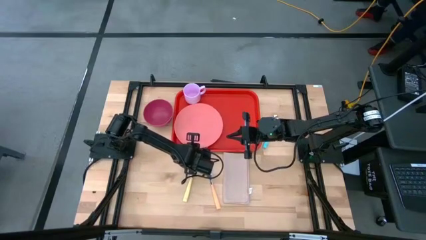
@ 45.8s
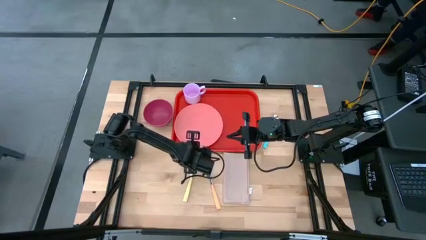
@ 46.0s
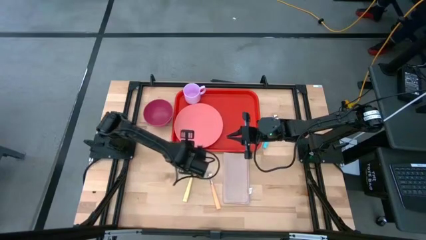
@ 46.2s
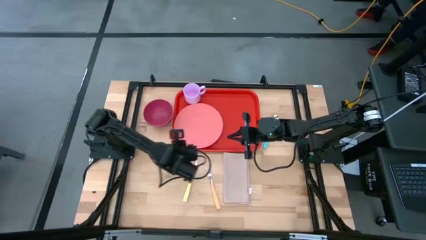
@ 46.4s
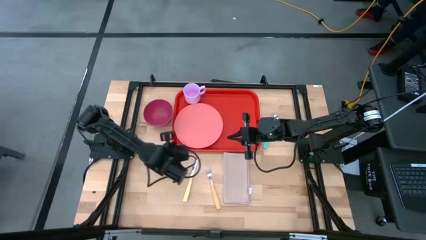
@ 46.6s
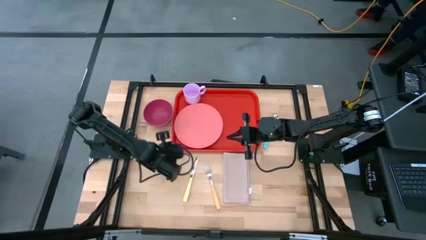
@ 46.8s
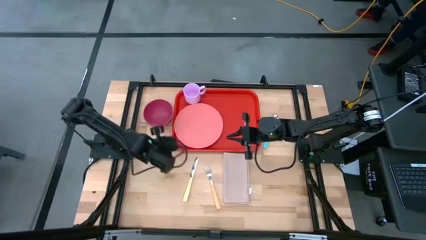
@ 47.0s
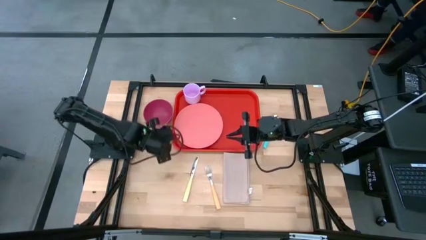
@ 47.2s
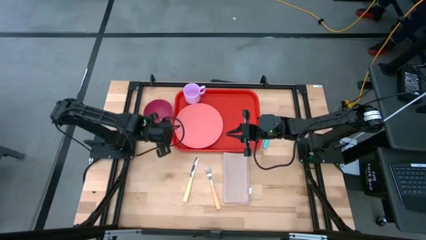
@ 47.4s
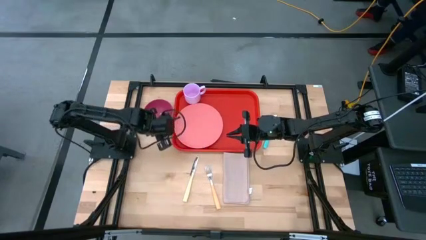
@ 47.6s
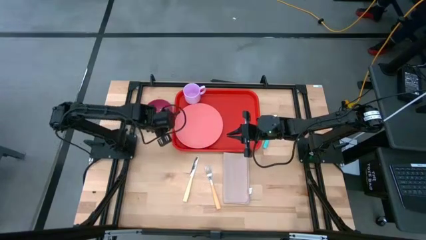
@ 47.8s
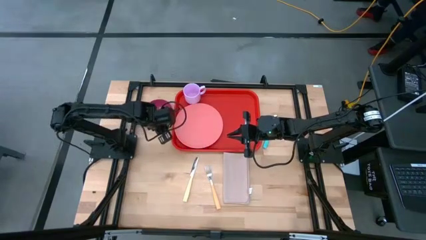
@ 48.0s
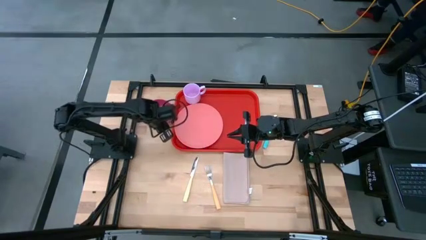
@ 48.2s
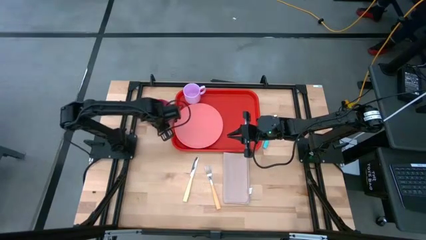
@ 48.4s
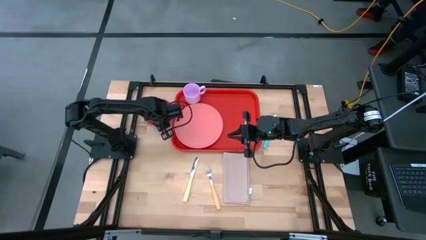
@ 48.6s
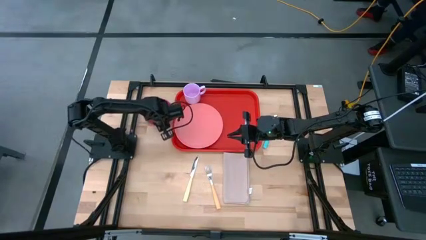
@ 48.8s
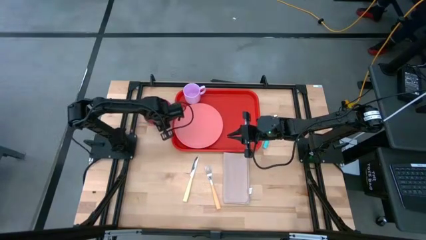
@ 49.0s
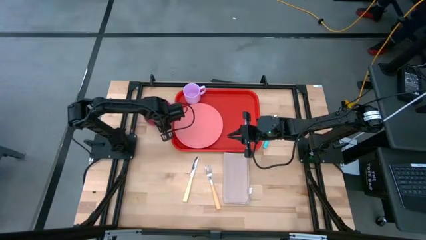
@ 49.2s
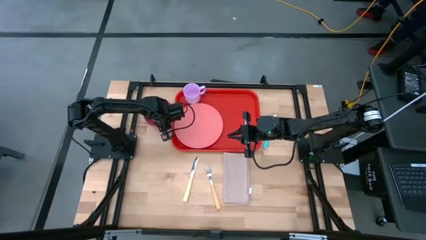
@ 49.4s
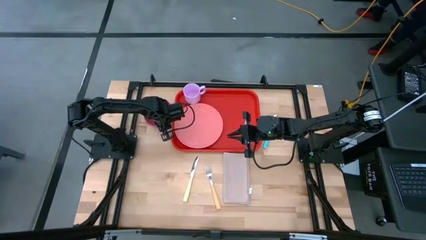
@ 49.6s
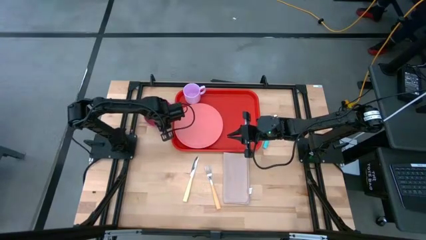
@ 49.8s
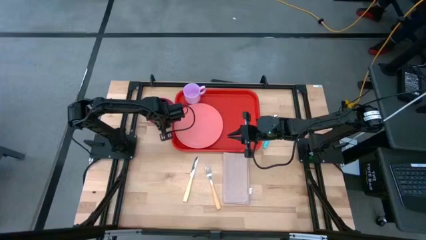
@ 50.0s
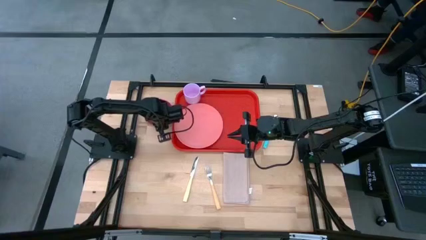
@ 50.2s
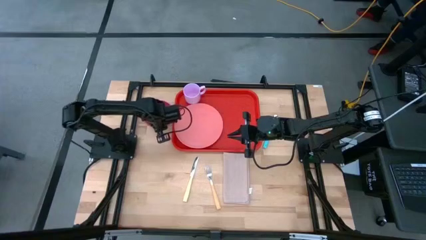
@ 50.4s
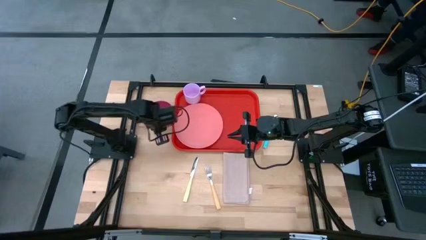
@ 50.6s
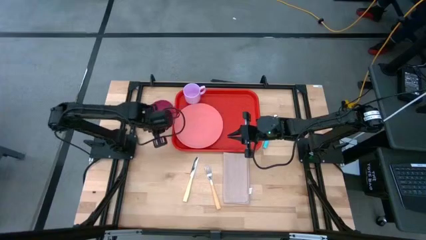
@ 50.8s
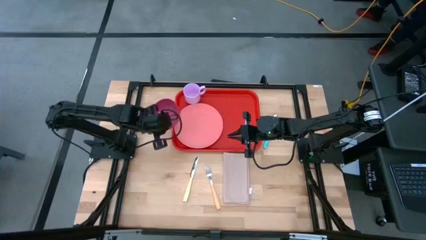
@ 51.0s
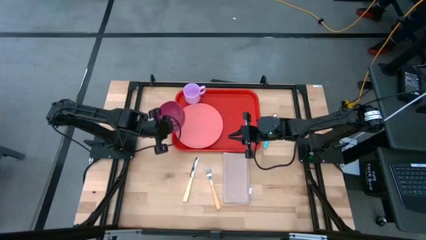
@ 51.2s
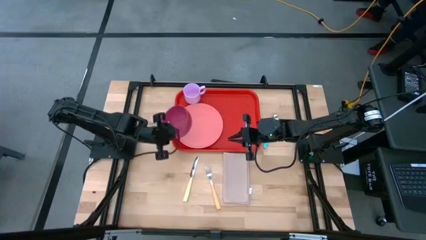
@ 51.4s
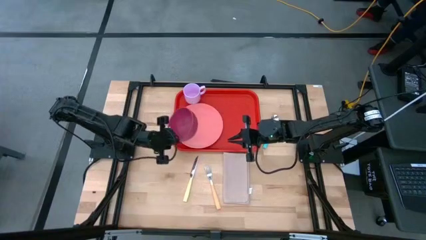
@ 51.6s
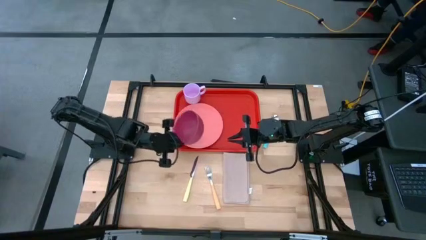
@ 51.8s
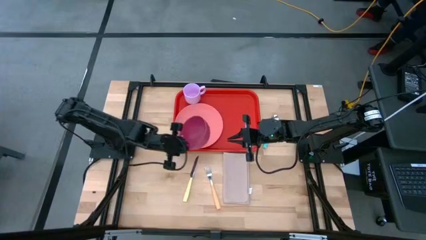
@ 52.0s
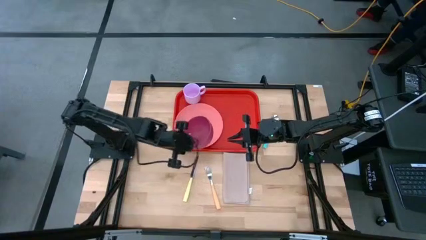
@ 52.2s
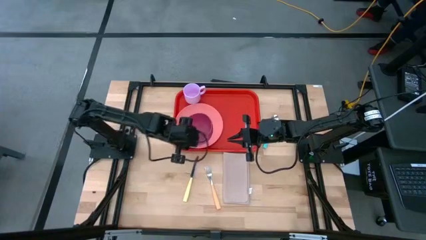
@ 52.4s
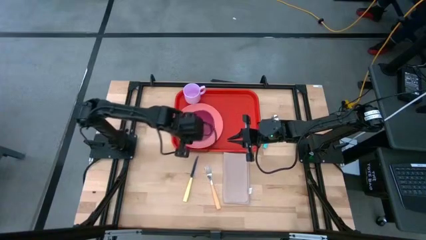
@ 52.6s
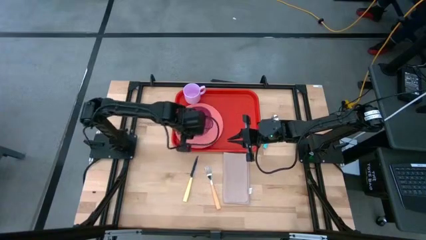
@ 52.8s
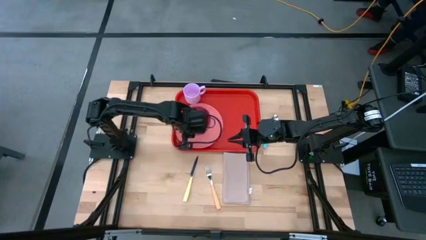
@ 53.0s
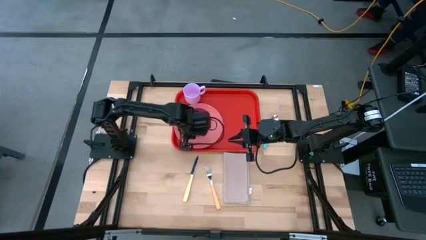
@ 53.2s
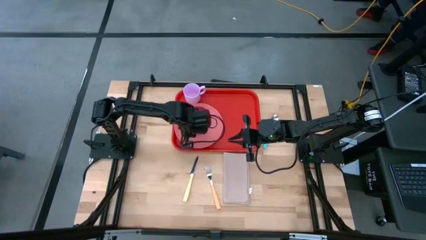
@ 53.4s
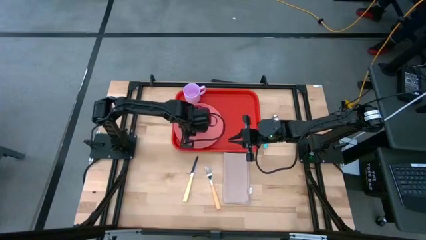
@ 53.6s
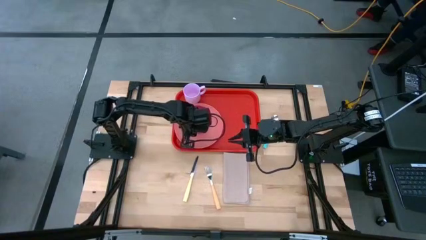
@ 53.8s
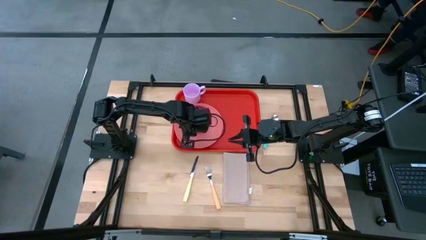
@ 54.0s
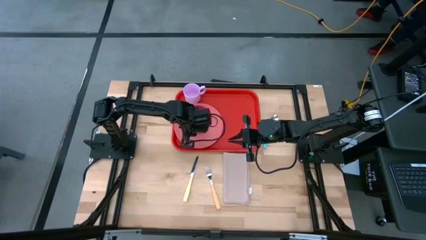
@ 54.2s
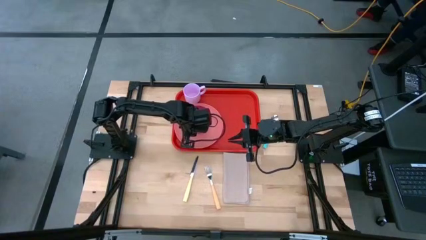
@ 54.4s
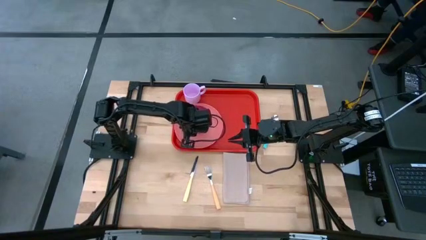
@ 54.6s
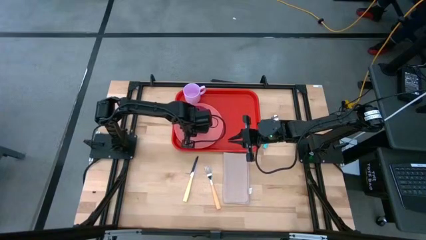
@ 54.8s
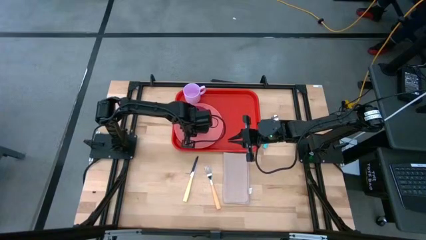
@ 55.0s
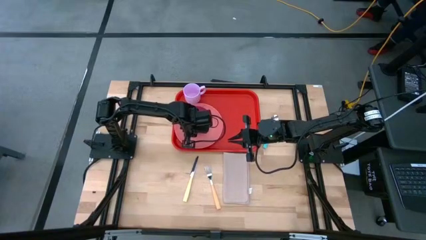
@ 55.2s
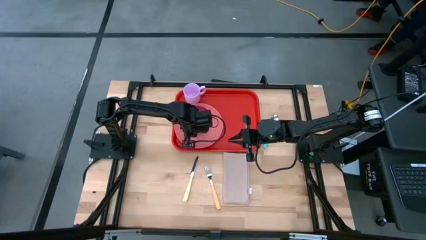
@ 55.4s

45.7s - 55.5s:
Task: Set up tray
Put the red bowl on top of the pink plate

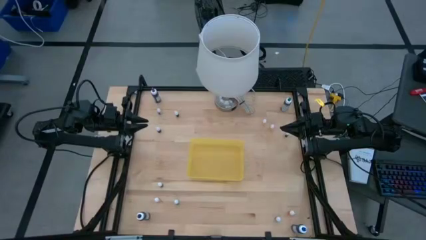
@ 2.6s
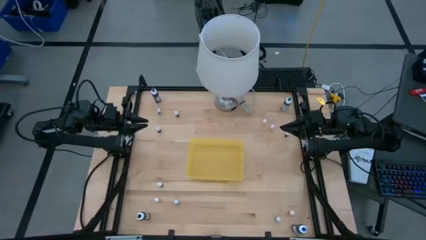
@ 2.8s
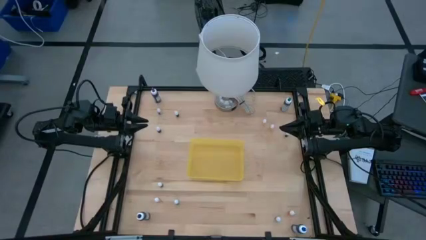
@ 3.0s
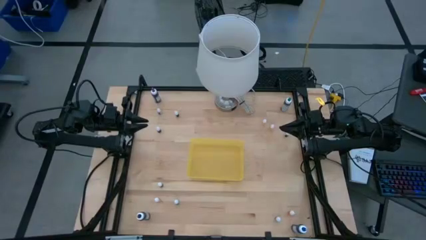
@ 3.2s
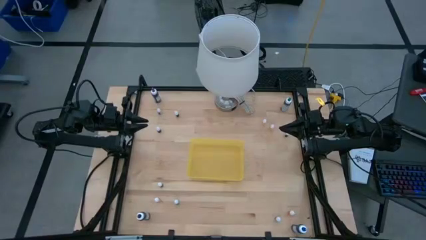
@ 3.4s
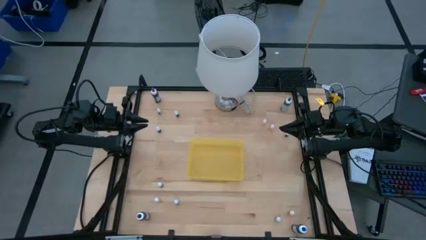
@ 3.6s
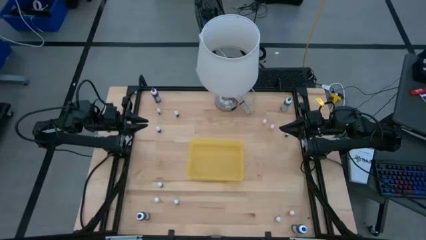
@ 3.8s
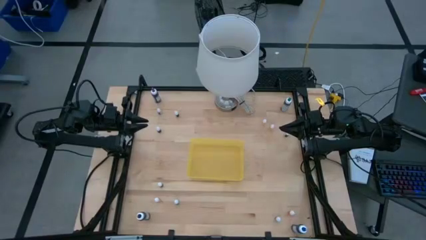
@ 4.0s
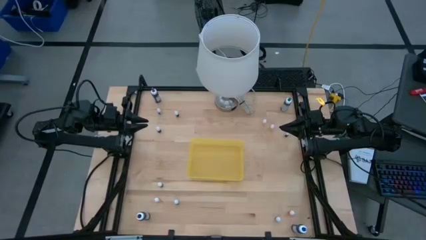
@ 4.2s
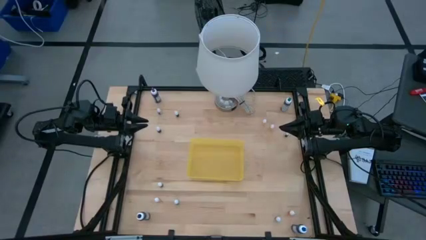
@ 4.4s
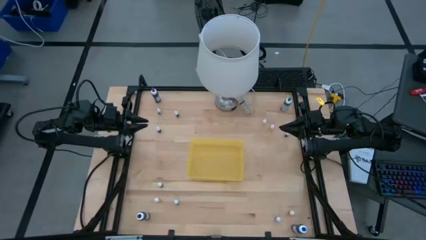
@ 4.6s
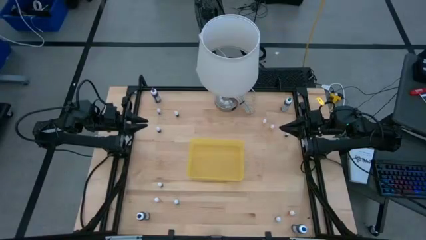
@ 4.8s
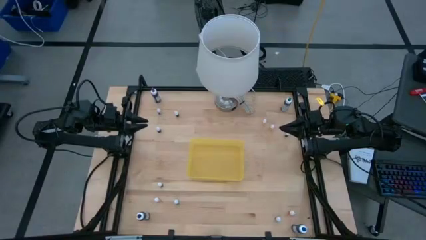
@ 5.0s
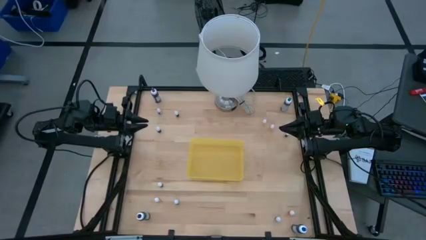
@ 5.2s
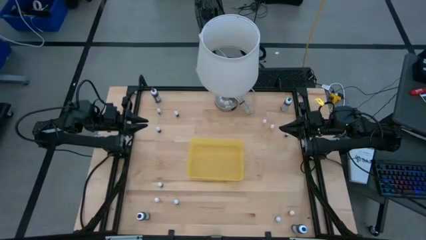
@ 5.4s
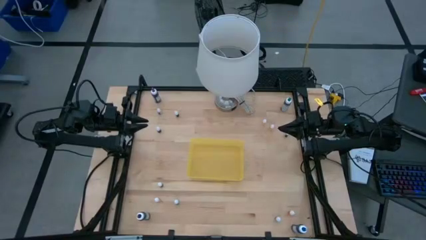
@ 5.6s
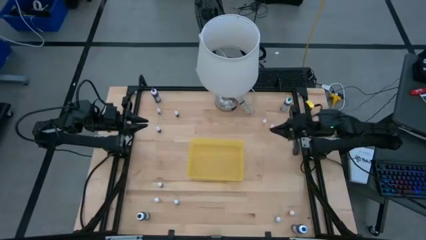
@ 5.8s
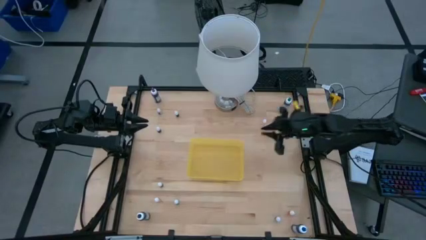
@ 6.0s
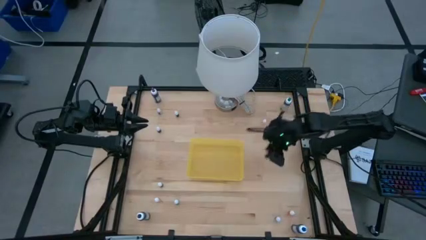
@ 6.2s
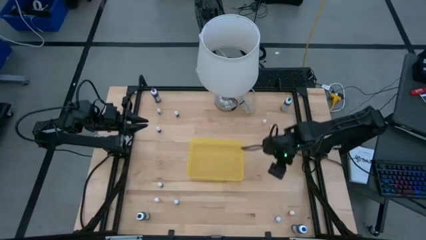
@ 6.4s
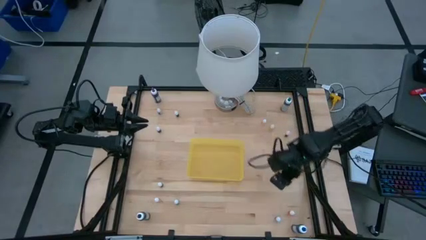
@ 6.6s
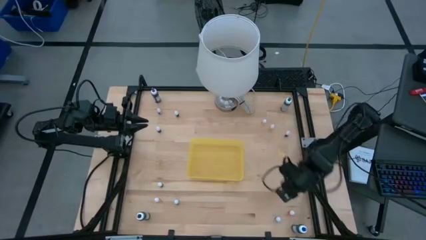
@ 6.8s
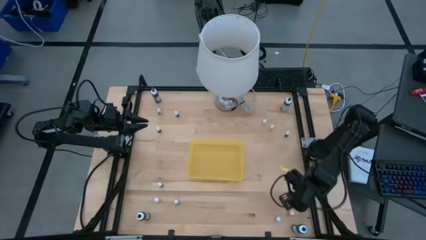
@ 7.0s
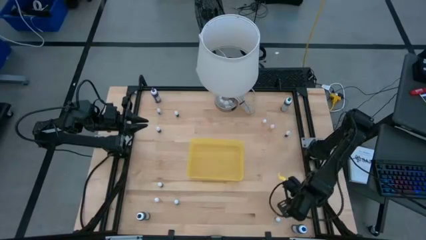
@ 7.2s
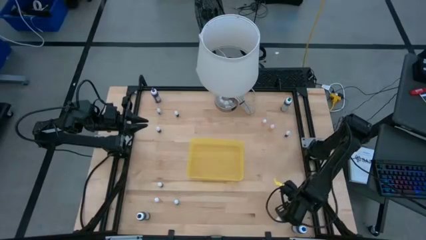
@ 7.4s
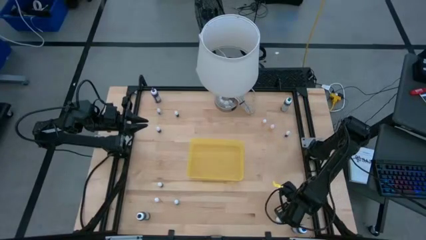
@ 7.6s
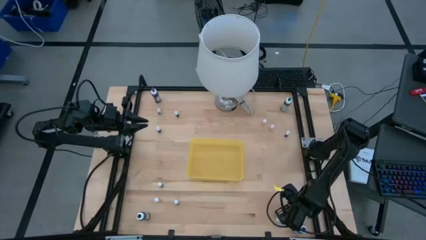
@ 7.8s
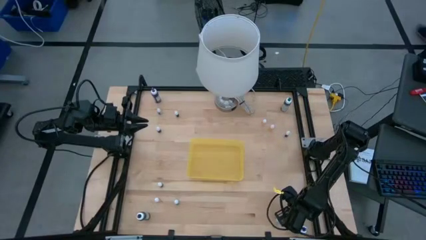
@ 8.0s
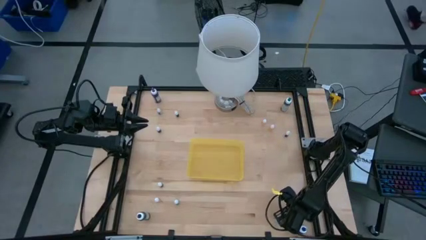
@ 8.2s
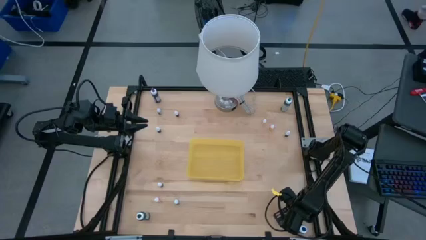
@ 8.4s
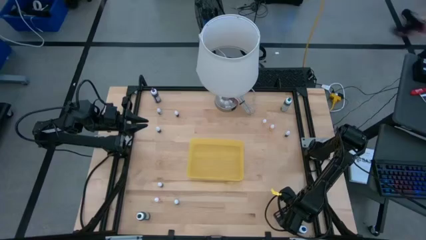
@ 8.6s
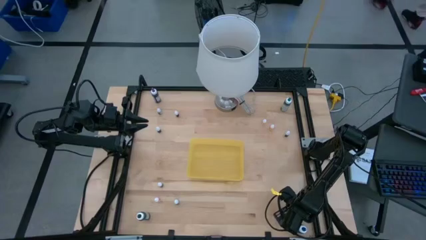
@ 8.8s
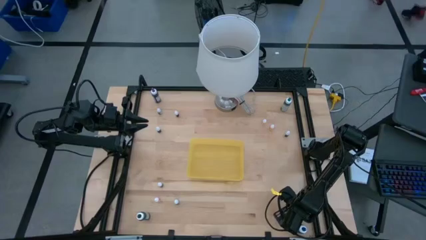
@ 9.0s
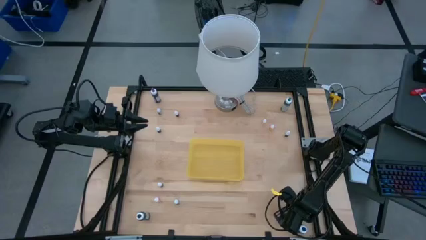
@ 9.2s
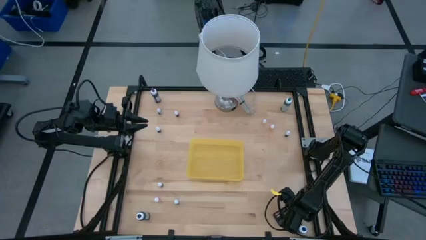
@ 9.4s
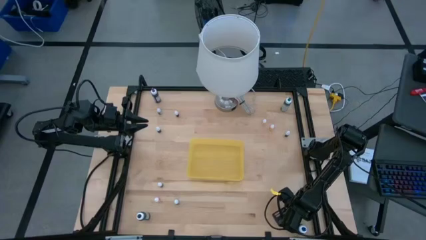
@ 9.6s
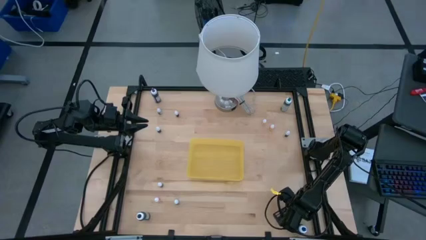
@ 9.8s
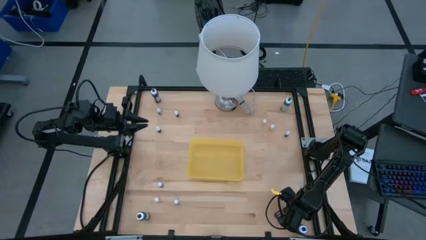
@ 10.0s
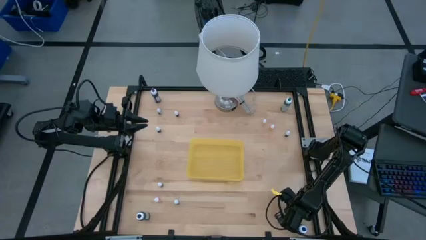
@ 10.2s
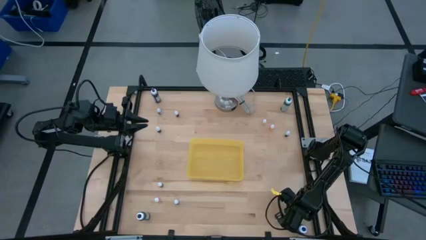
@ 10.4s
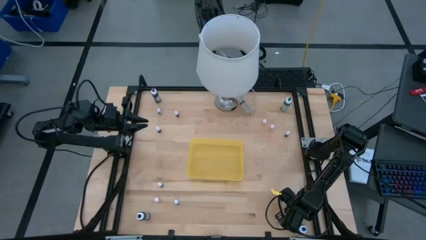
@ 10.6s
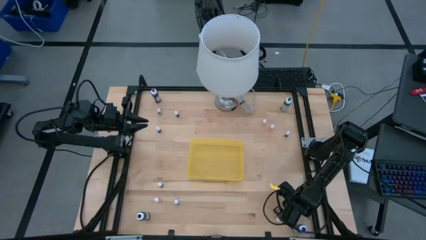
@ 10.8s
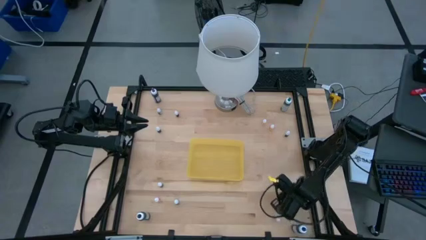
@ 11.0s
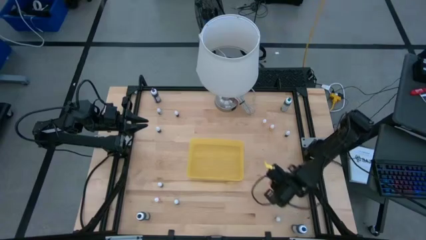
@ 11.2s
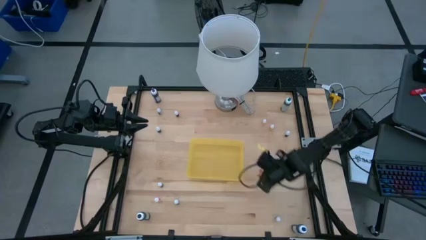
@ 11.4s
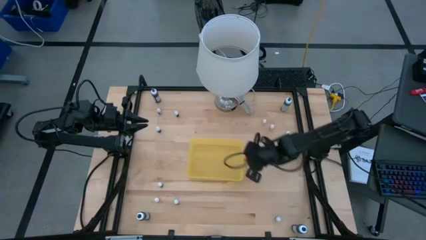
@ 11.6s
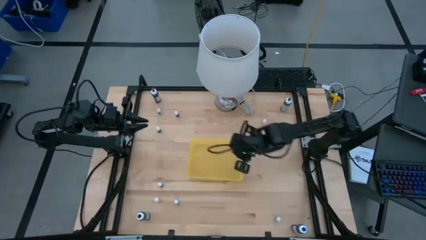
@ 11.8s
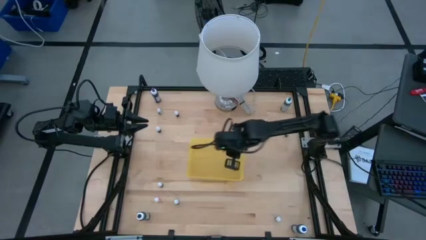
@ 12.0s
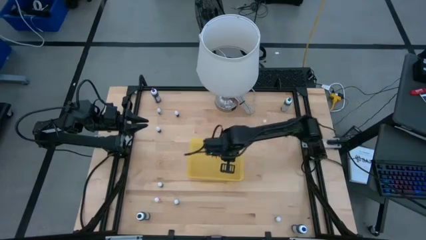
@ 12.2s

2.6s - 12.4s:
Task: Pick & Place food coloring
Put the yellow food coloring bottle into the yellow bin
